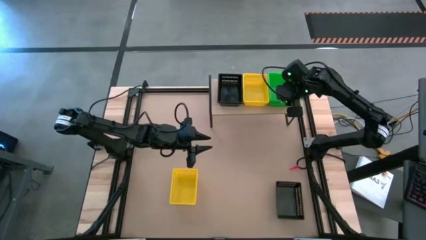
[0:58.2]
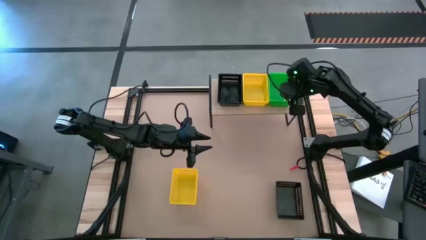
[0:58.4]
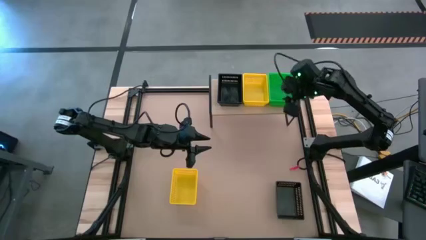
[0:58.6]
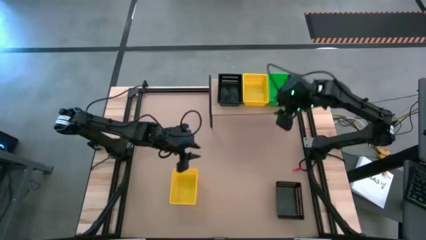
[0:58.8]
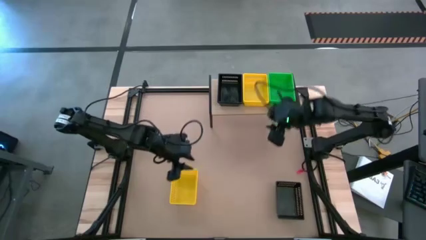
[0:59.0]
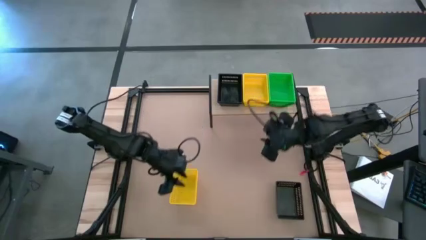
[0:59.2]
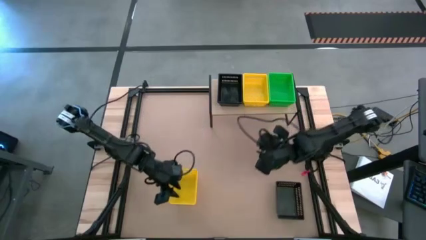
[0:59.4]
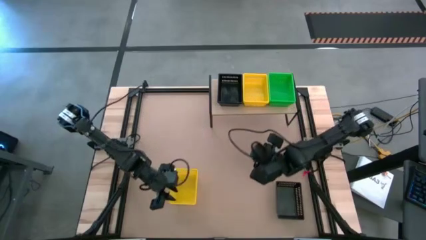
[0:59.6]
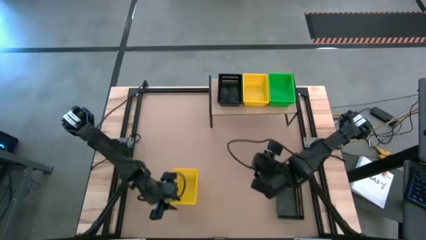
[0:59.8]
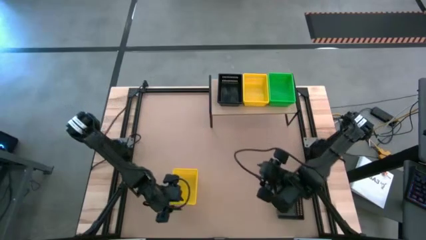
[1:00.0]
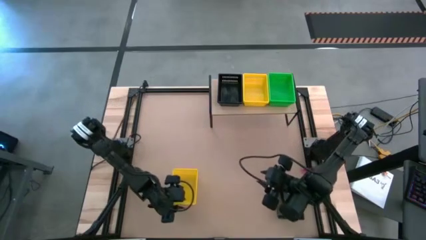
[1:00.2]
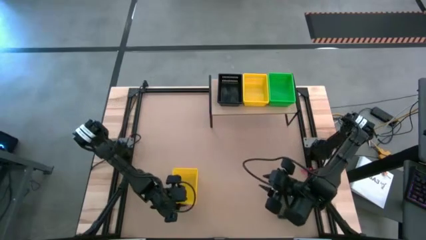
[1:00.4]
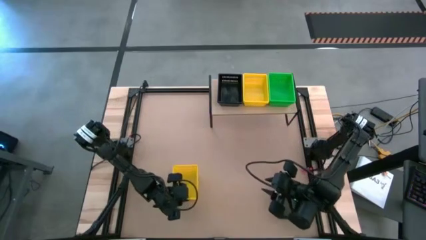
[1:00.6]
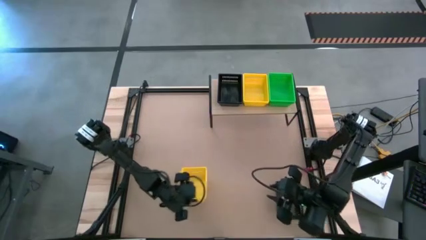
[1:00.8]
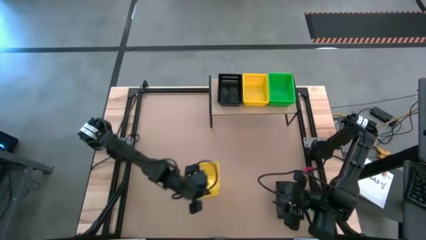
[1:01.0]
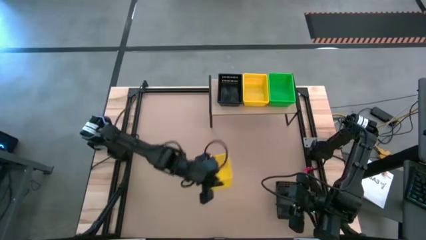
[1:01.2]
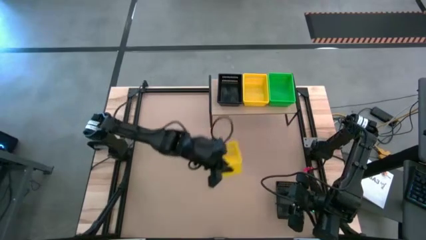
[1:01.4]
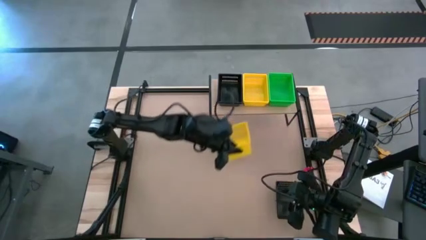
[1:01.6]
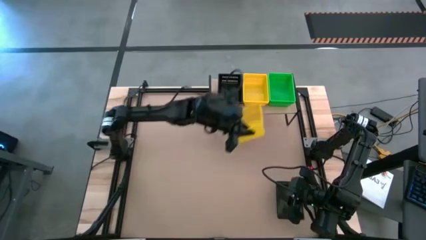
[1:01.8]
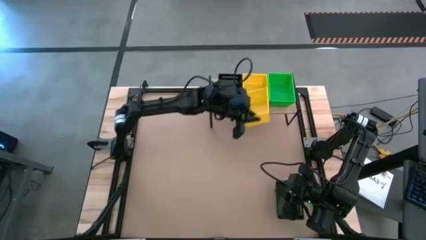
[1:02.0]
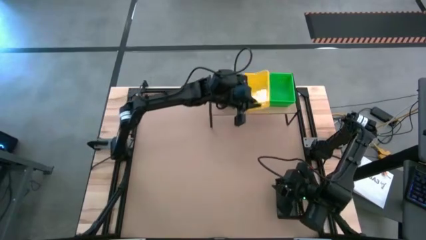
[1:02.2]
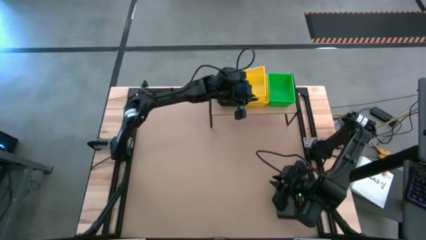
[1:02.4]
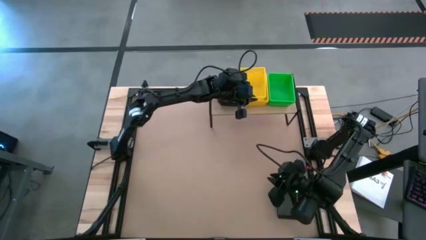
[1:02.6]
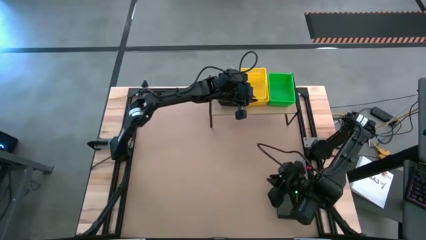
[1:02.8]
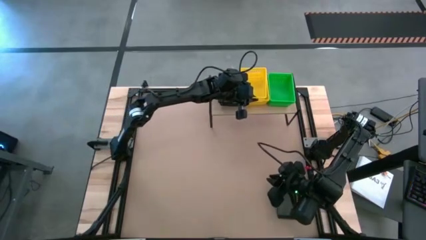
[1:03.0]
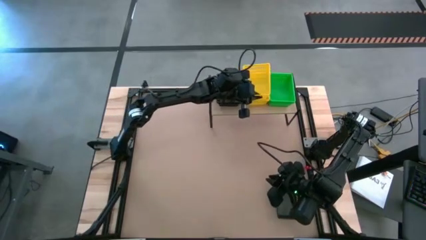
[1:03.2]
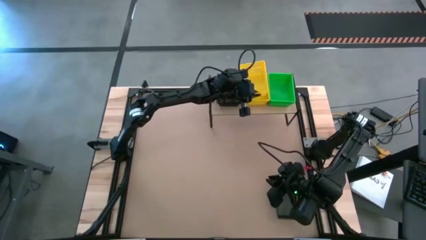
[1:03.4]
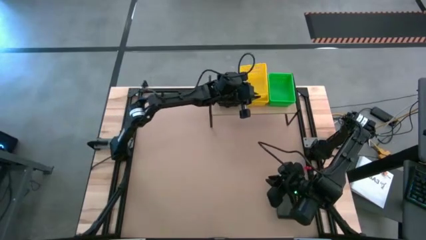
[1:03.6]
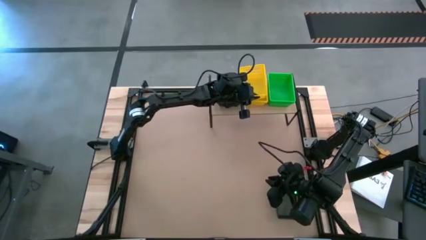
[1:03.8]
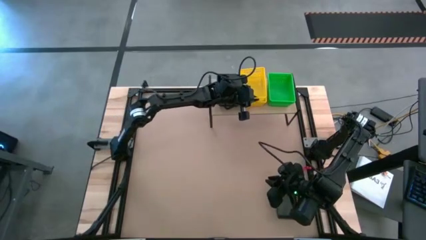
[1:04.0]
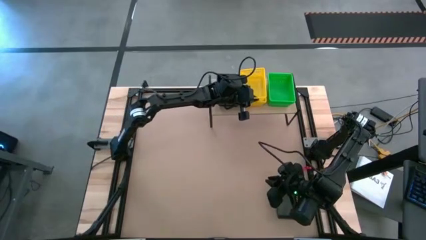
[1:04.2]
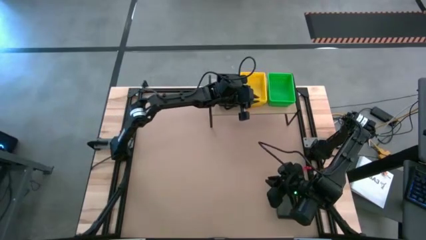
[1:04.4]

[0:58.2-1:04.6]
Task: Stack baskets on shelf by color
Stack the yellow bin on top of the yellow bin on the shelf

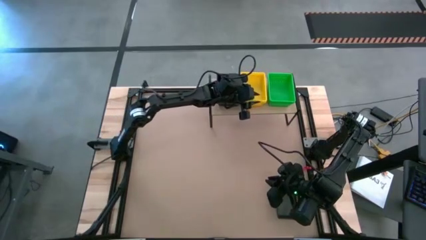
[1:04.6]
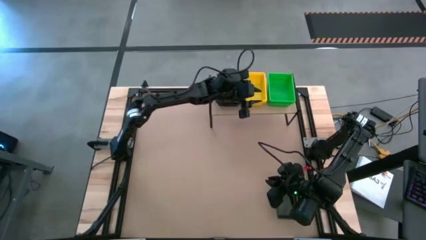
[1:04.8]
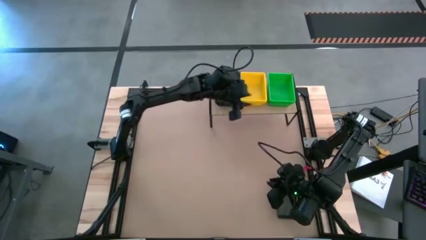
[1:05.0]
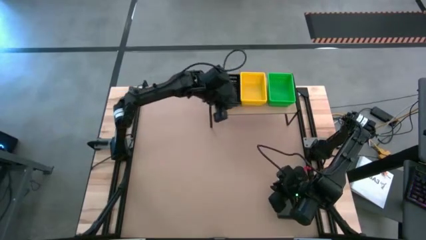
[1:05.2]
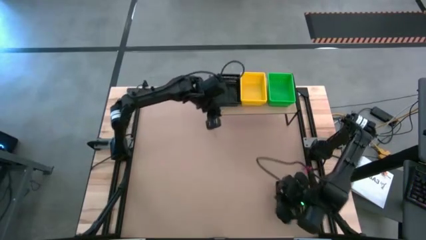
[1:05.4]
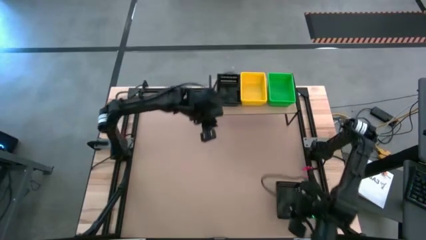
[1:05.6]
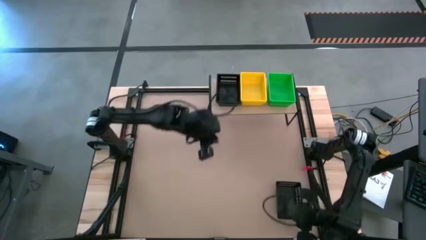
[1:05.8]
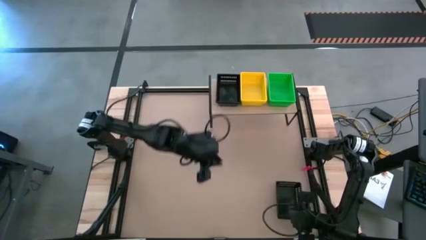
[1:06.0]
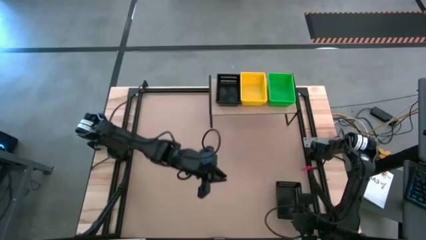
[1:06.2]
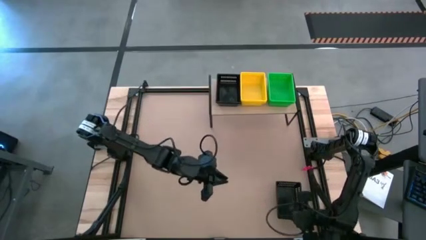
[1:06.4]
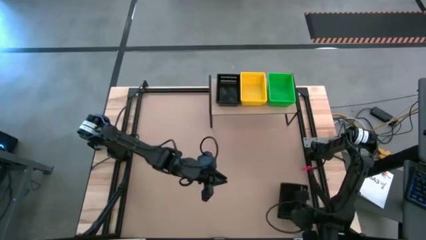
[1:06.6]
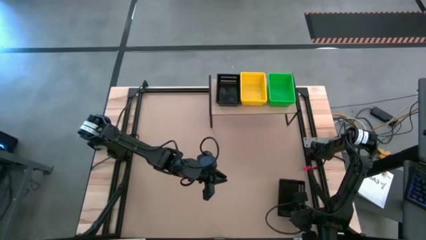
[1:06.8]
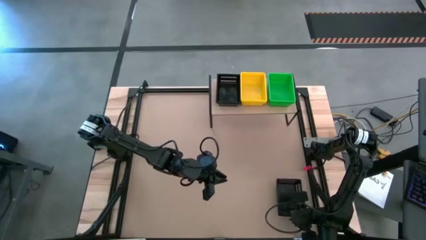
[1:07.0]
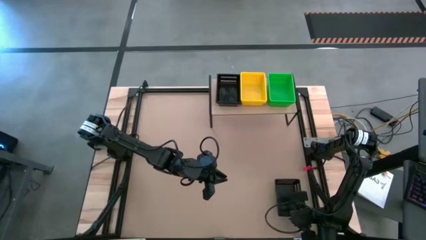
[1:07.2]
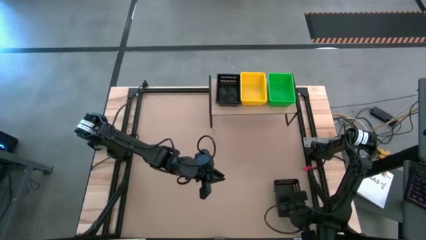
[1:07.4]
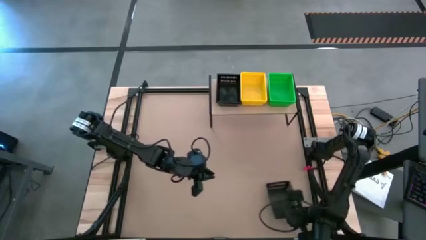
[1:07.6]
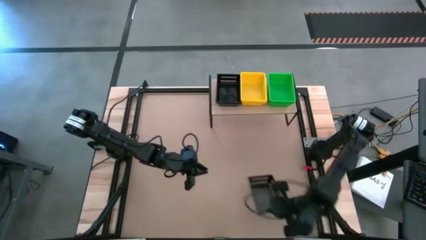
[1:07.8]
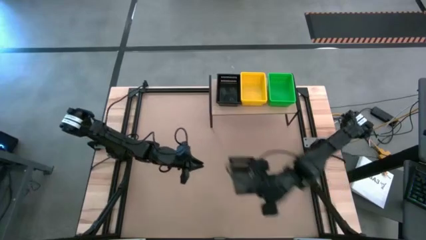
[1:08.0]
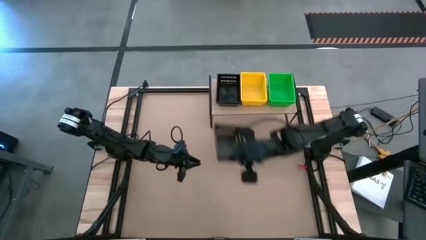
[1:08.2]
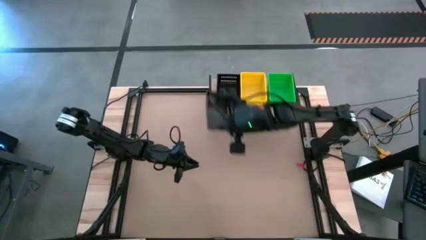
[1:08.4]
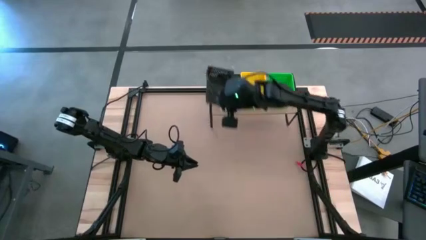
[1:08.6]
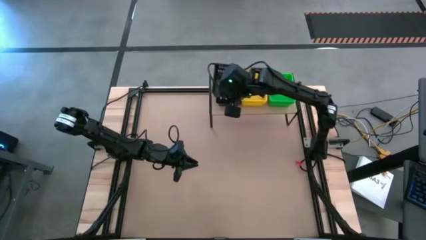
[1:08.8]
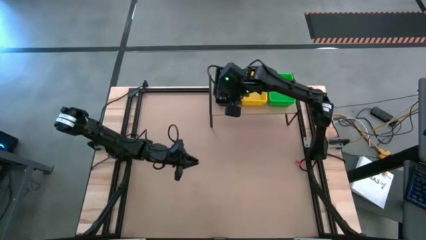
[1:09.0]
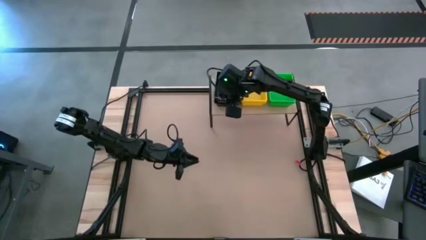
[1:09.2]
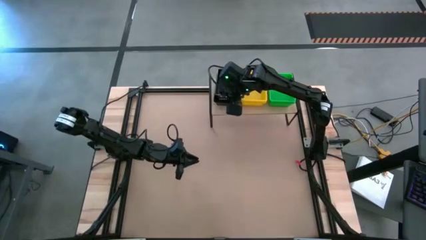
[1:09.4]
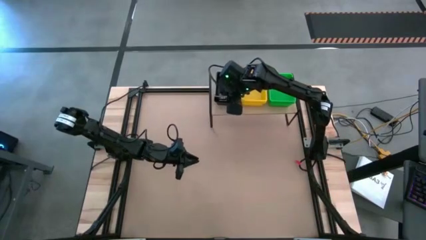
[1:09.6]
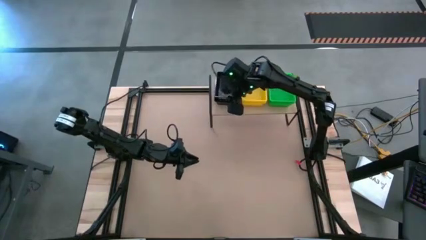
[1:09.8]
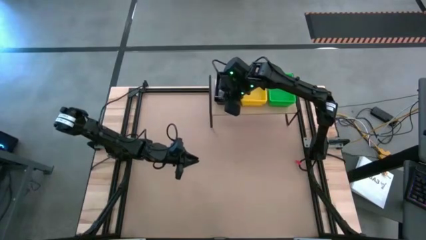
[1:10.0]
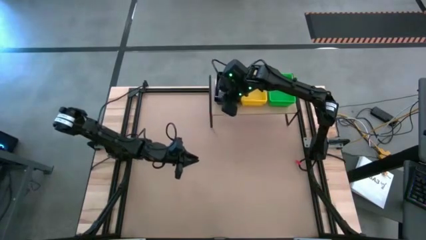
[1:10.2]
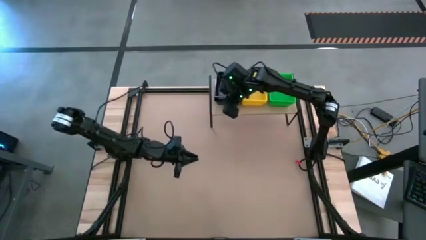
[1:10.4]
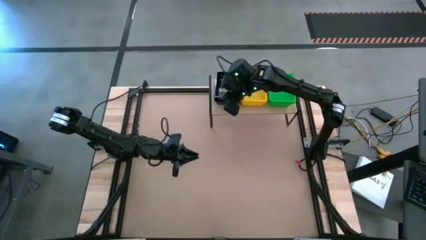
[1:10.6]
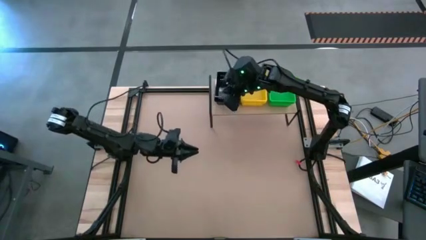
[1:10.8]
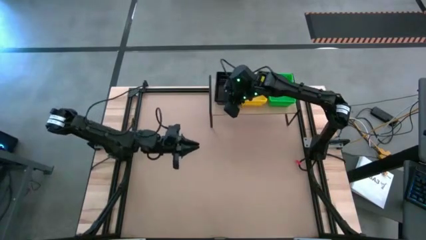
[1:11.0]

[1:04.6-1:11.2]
Stack the black bin on top of the black bin on the shelf
